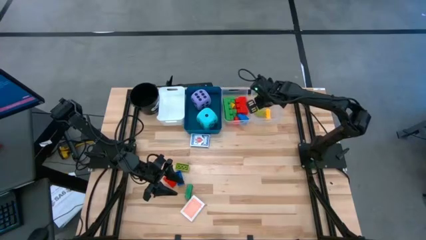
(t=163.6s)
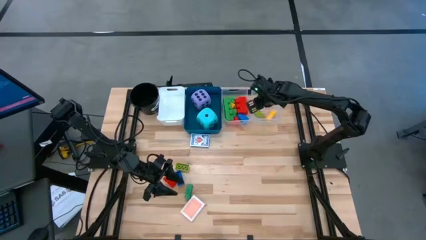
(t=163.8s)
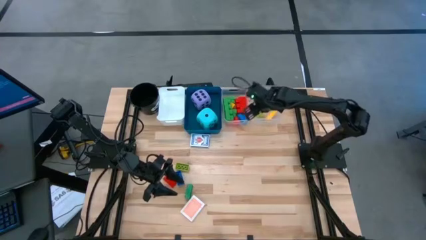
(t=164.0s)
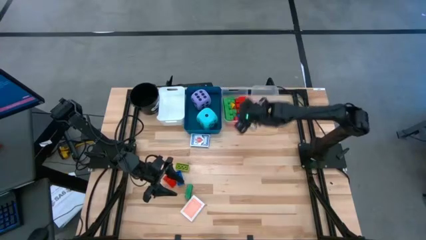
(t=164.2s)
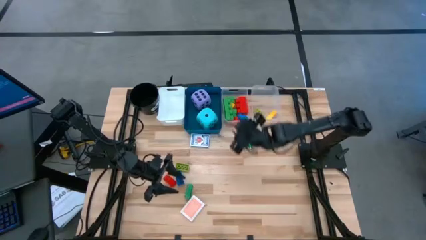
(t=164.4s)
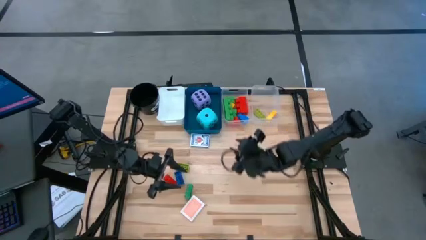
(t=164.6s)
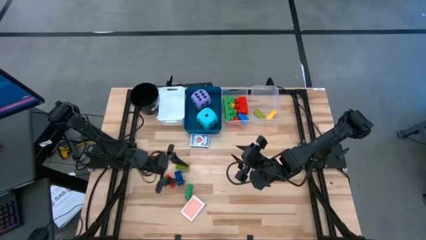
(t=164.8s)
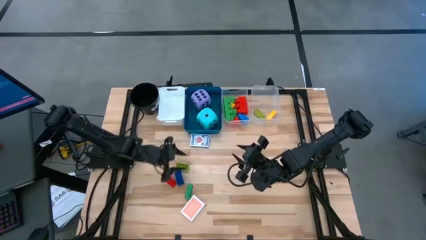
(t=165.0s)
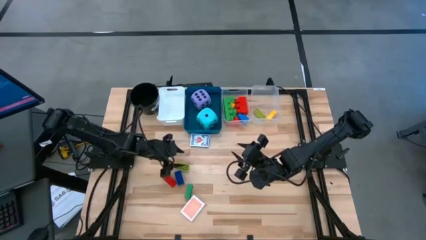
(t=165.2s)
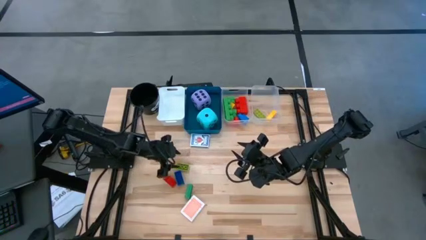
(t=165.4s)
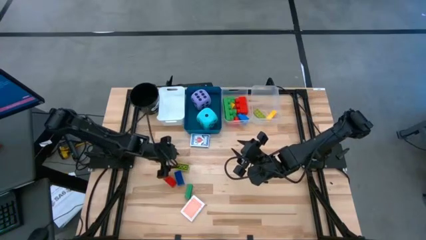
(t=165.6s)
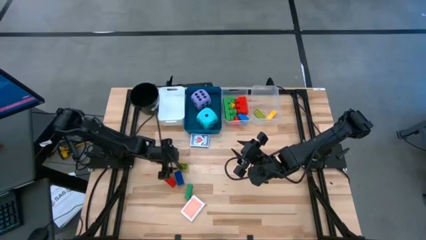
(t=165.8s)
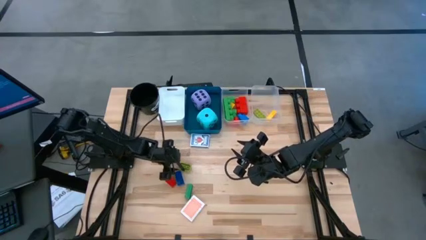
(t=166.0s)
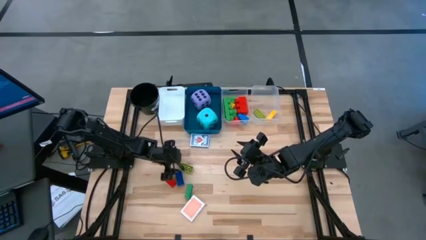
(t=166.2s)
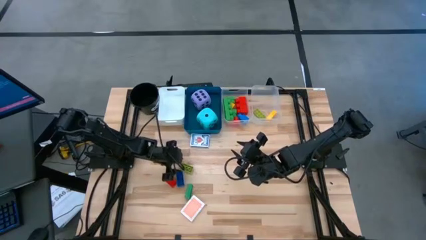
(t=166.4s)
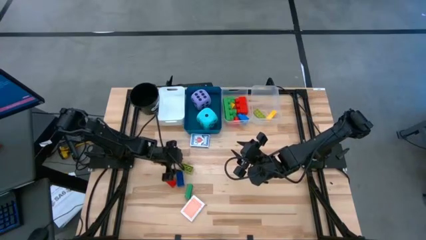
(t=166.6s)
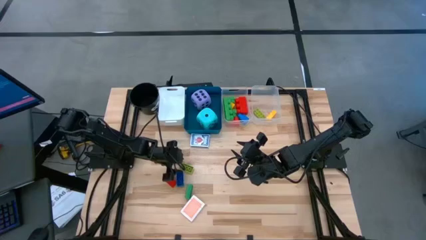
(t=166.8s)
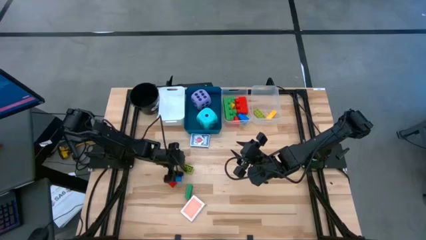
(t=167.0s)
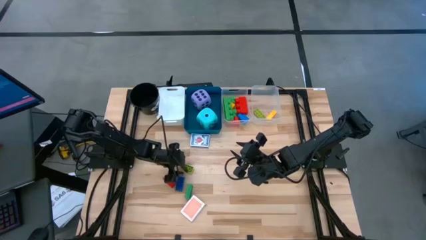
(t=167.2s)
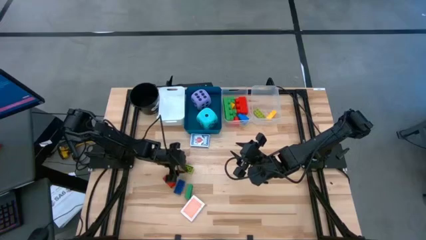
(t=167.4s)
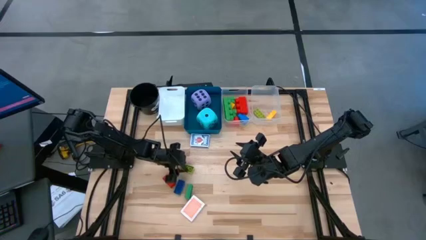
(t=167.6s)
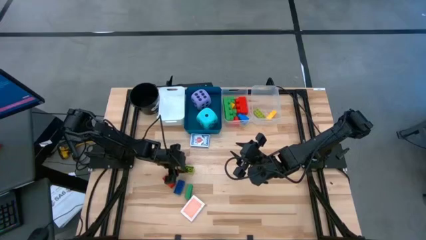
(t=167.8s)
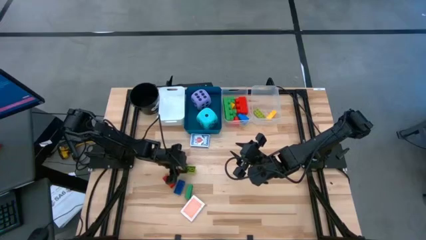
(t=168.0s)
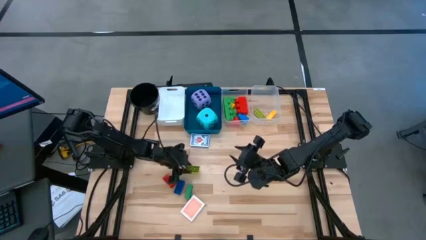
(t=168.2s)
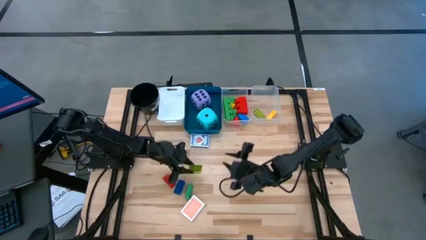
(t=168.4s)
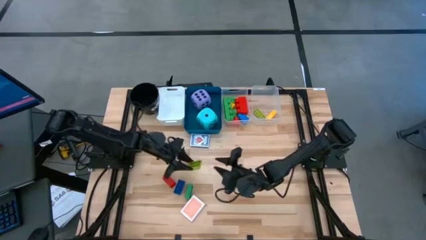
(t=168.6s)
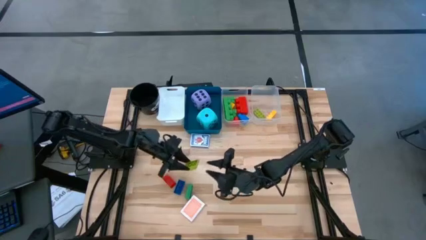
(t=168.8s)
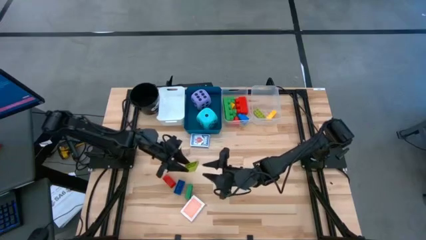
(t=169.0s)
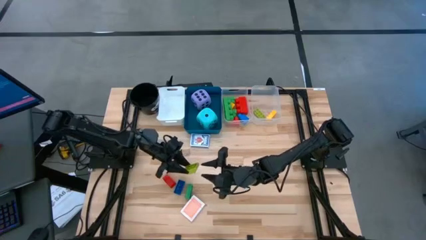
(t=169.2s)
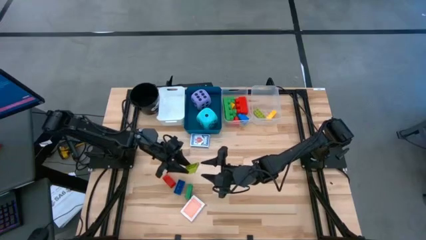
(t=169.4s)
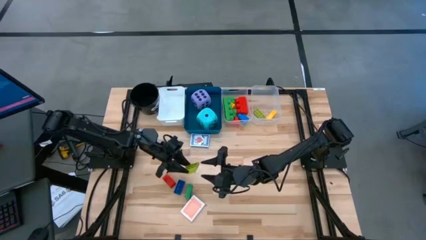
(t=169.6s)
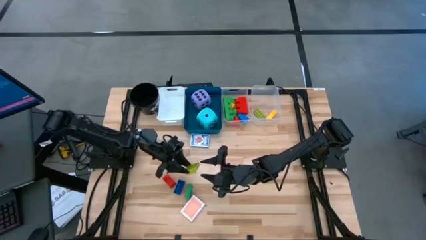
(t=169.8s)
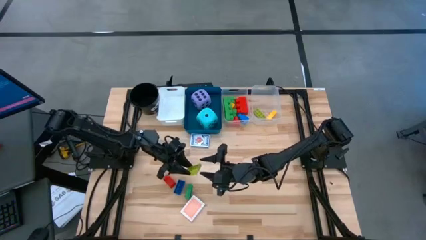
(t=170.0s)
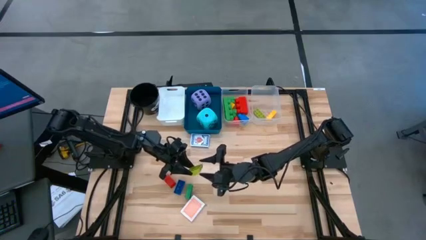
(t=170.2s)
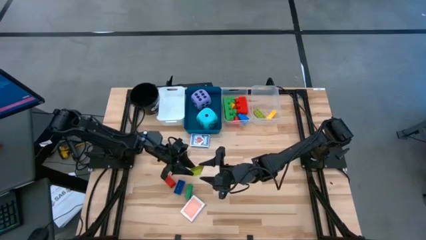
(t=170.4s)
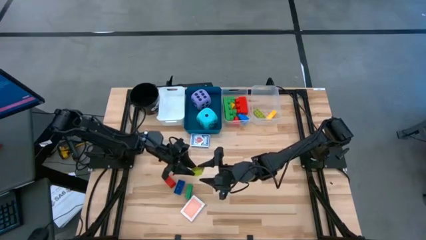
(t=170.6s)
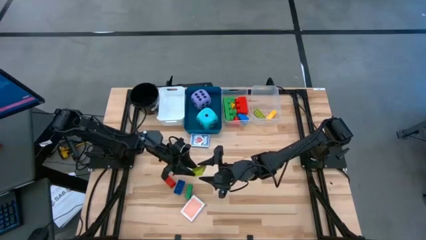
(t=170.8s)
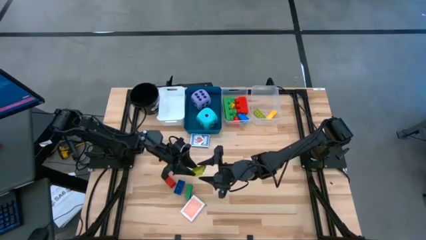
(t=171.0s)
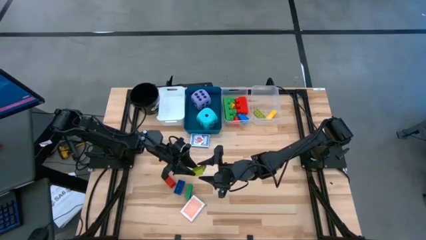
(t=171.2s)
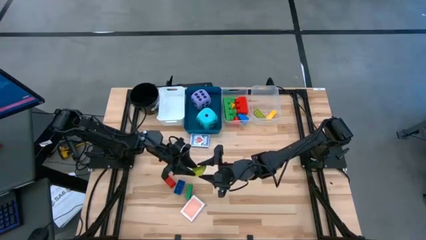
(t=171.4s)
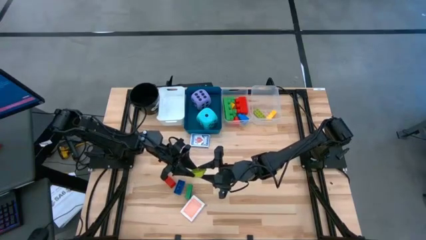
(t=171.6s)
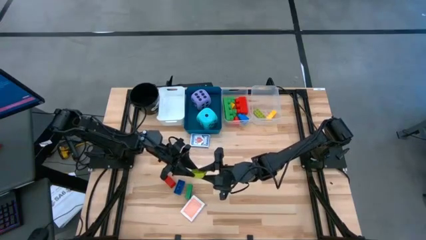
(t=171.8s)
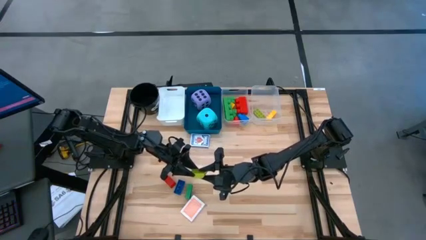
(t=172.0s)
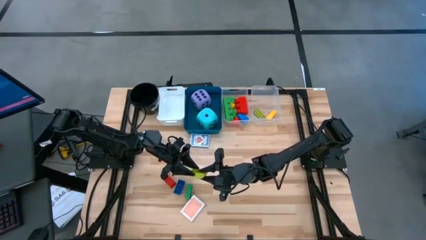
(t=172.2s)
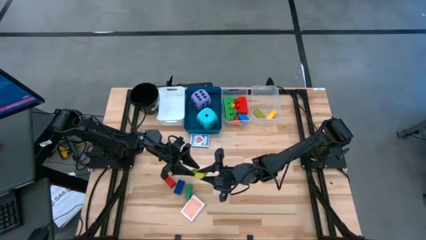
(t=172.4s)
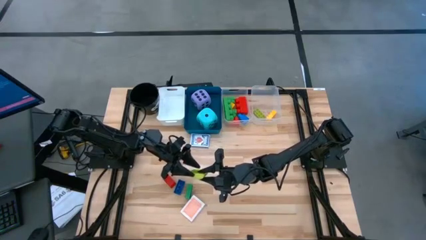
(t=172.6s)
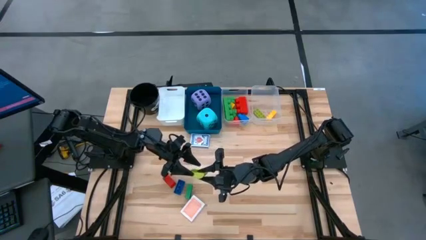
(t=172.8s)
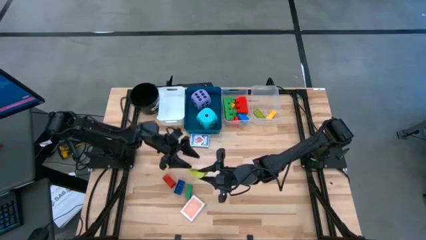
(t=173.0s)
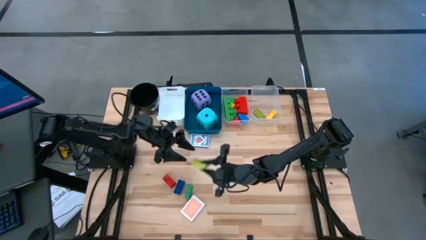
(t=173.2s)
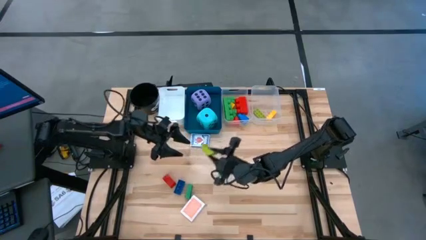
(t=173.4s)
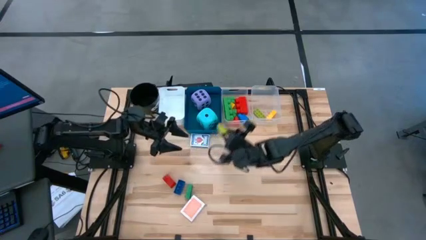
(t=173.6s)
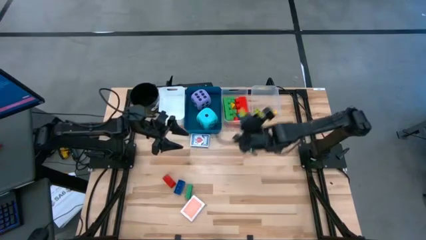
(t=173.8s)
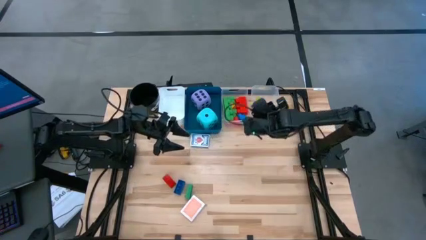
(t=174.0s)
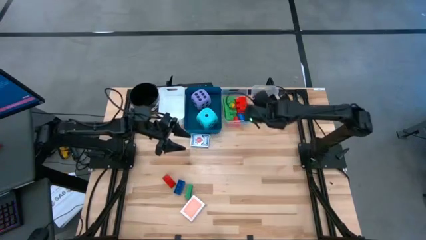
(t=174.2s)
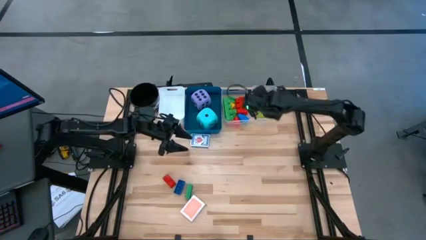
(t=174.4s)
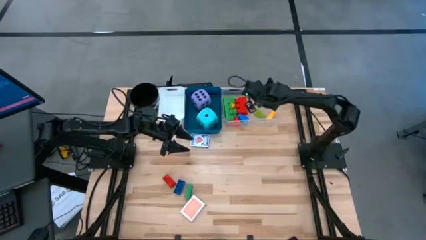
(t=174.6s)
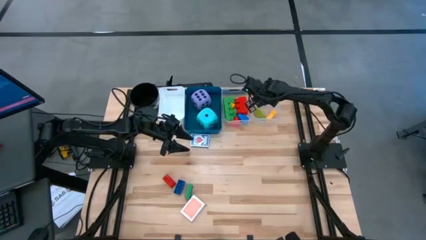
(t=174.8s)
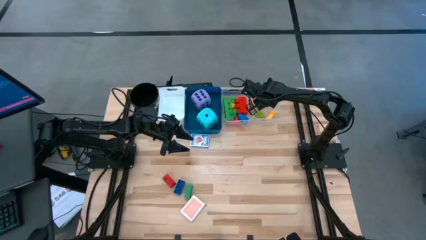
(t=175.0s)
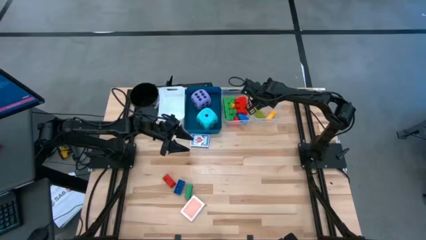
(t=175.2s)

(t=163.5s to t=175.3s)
Task: Pick & Place Toys
Put the light green 4 stud game piece into the left transparent bin

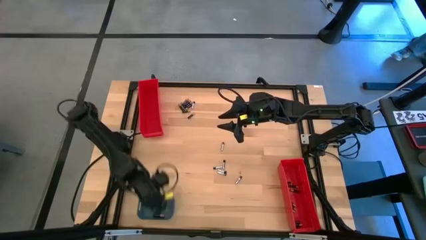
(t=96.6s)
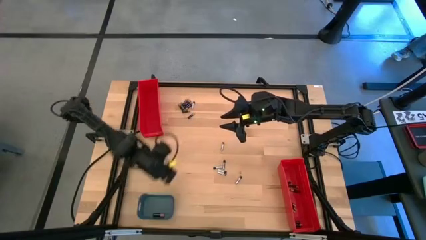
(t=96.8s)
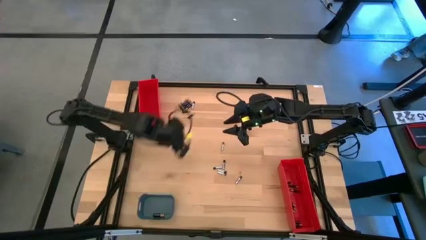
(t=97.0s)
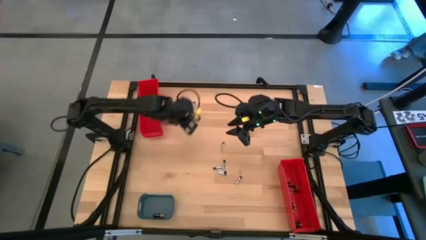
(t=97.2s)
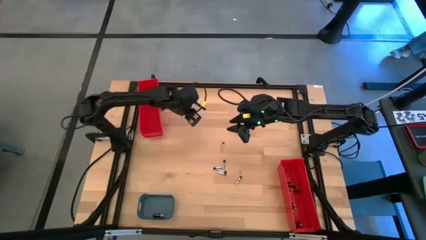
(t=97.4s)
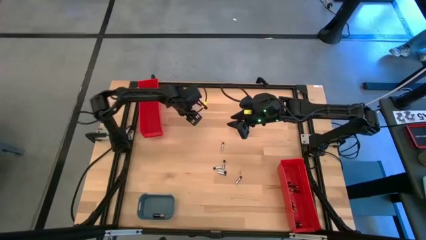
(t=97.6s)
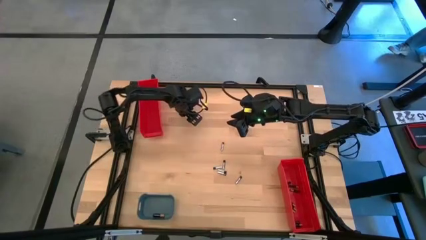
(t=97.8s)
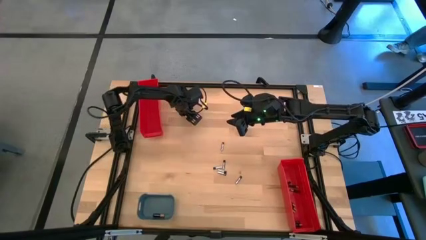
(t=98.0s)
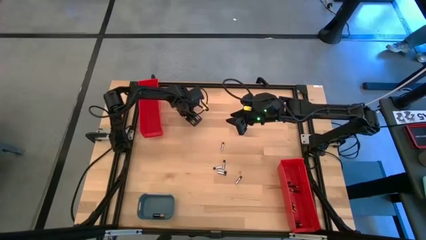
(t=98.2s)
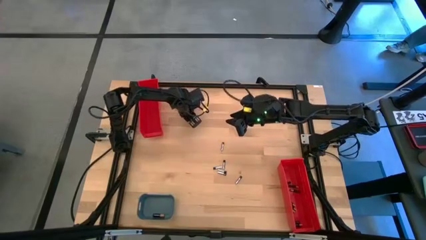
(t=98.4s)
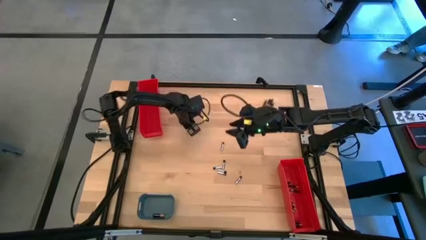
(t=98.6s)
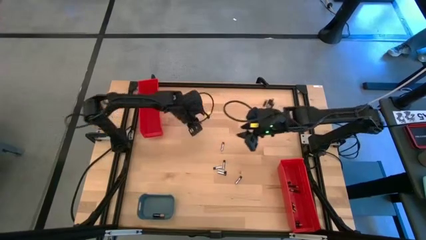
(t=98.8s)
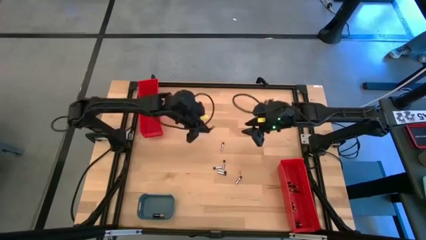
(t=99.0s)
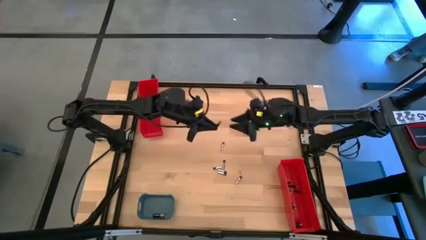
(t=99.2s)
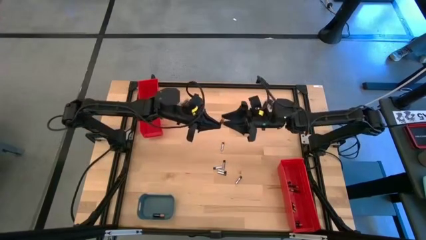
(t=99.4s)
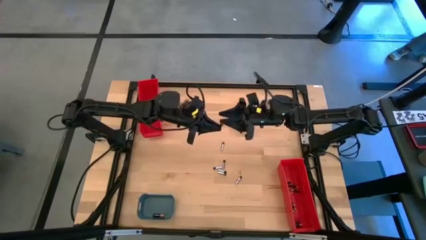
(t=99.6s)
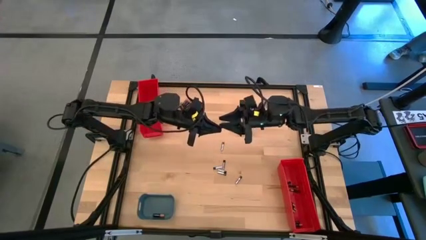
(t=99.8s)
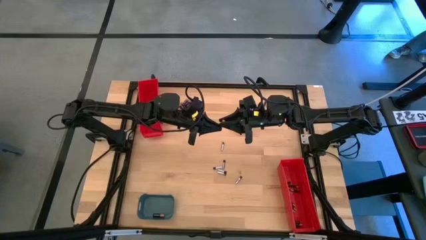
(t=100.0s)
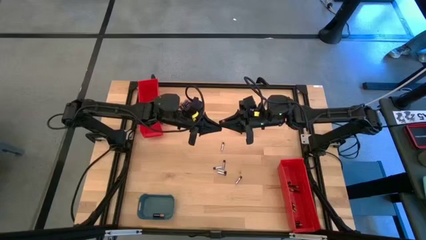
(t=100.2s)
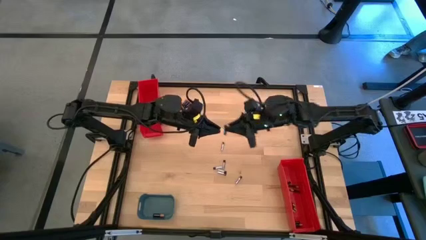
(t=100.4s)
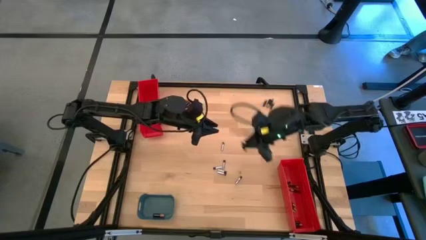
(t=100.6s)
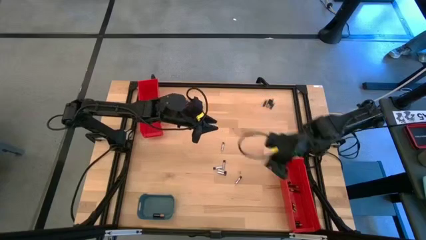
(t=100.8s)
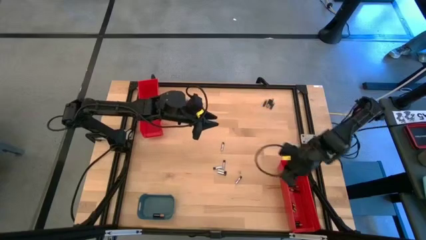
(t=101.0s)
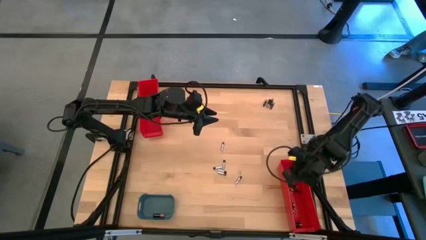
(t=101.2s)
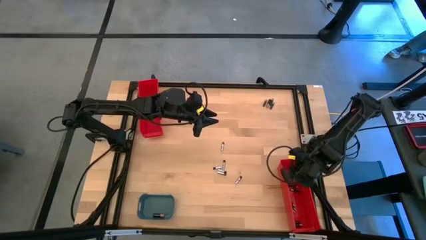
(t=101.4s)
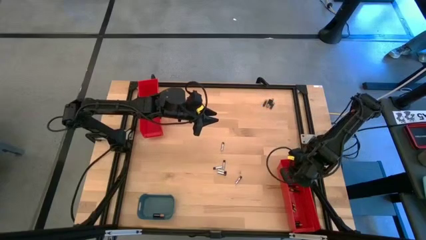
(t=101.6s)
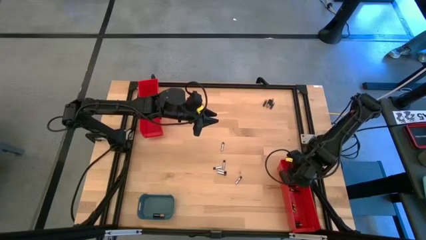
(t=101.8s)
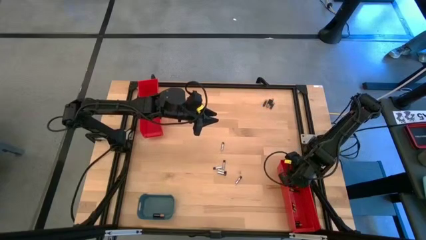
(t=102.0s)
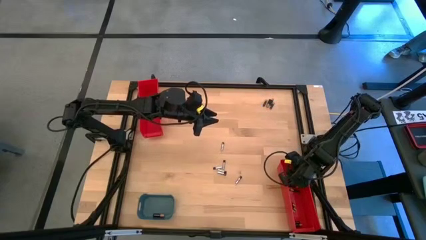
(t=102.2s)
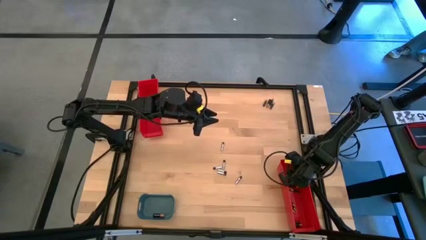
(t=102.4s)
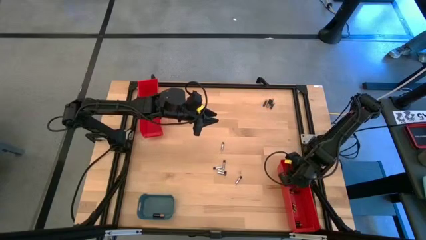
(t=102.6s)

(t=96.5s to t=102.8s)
Task: Sort batteries
Put the small black battery into the bottom red bin
